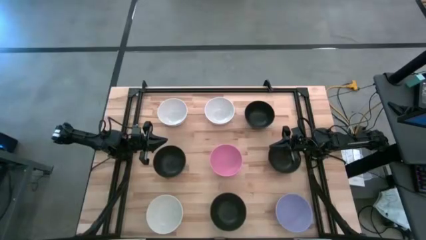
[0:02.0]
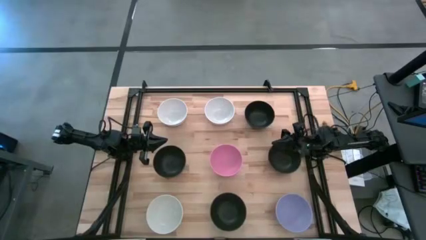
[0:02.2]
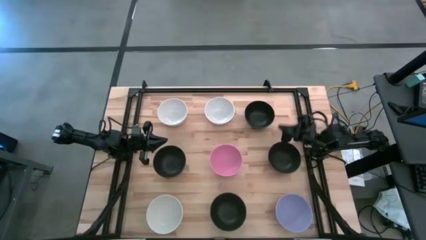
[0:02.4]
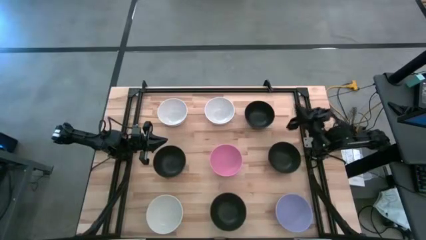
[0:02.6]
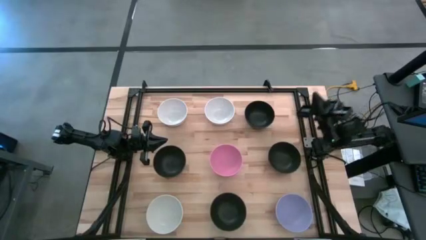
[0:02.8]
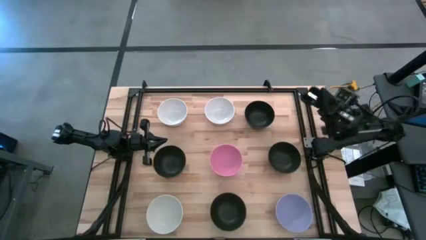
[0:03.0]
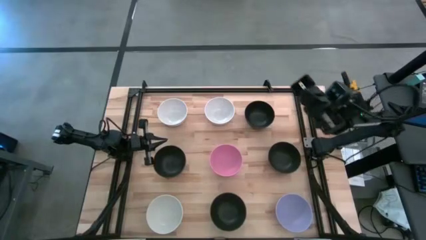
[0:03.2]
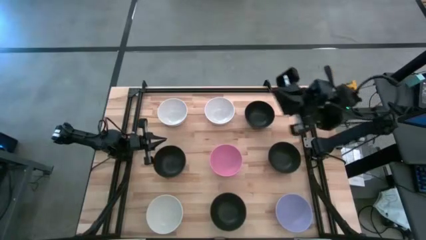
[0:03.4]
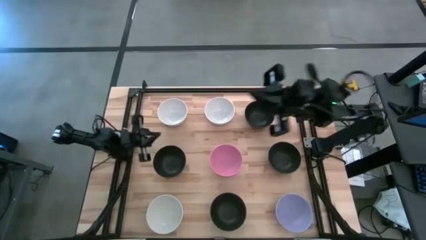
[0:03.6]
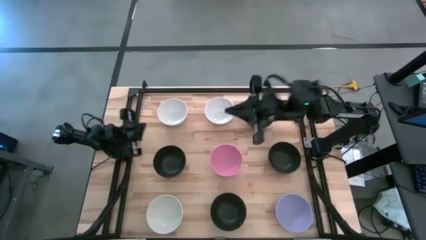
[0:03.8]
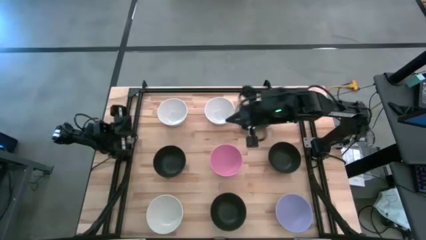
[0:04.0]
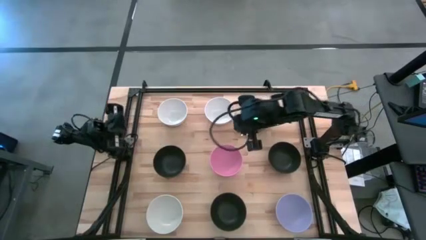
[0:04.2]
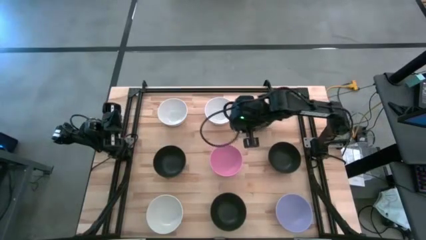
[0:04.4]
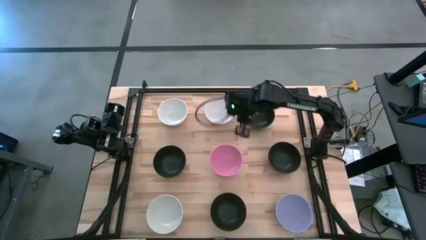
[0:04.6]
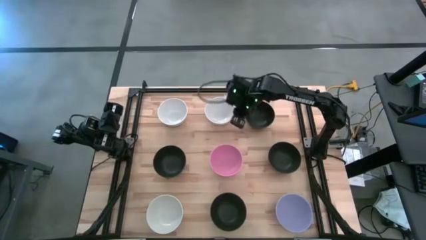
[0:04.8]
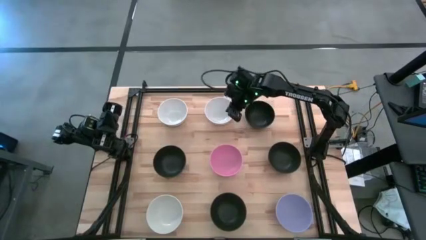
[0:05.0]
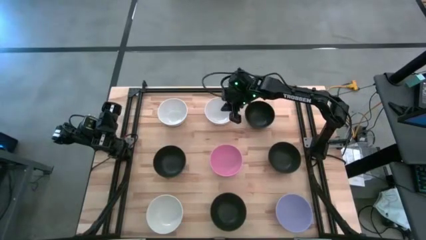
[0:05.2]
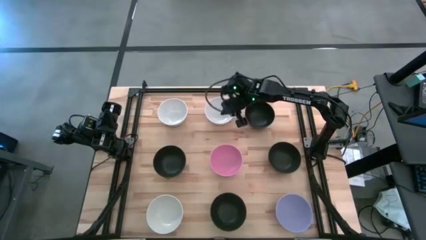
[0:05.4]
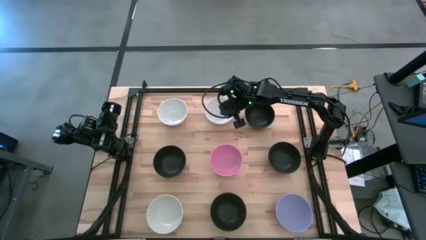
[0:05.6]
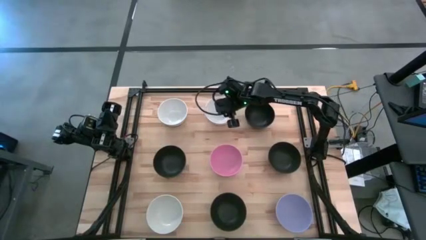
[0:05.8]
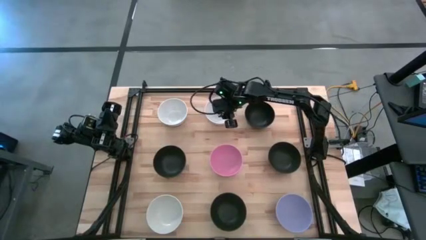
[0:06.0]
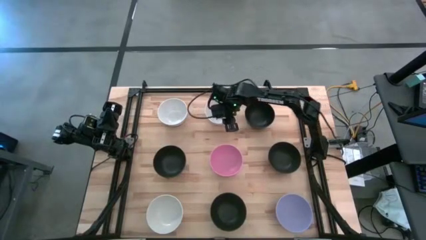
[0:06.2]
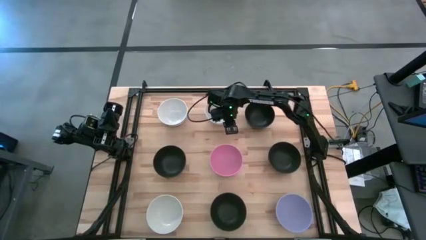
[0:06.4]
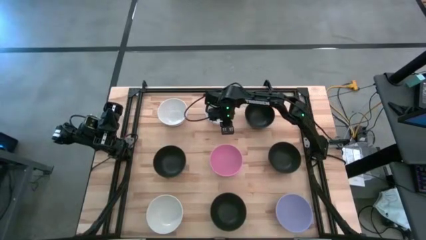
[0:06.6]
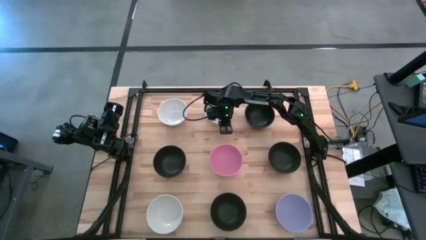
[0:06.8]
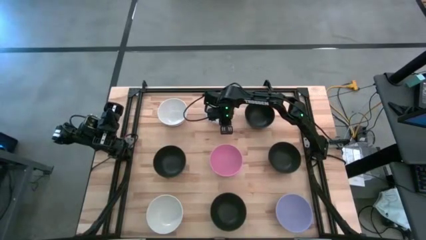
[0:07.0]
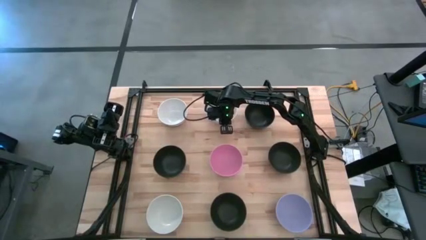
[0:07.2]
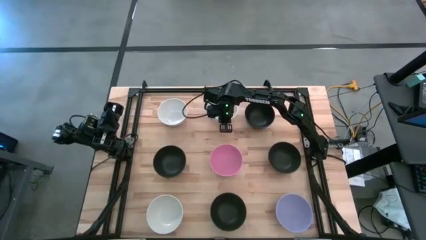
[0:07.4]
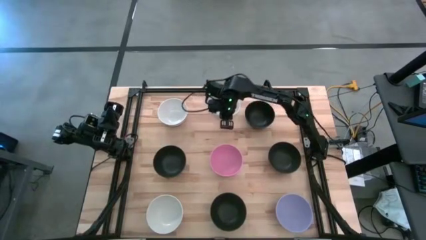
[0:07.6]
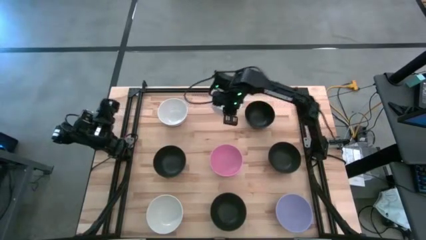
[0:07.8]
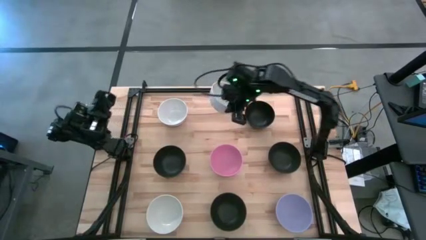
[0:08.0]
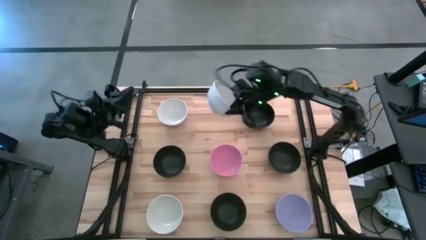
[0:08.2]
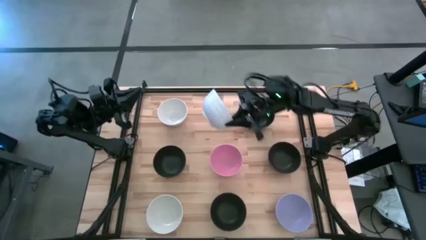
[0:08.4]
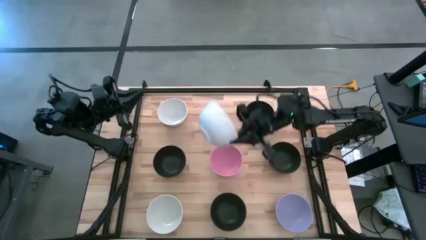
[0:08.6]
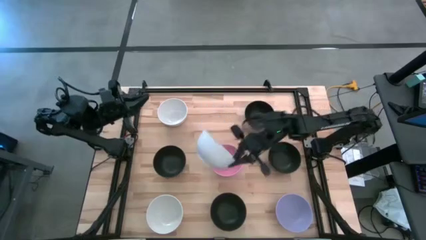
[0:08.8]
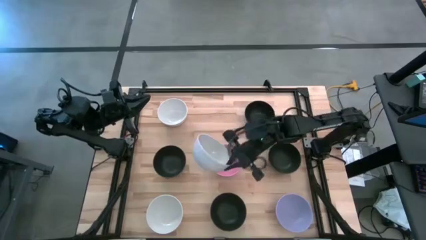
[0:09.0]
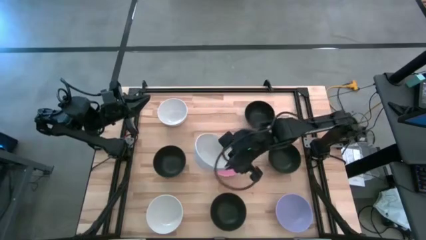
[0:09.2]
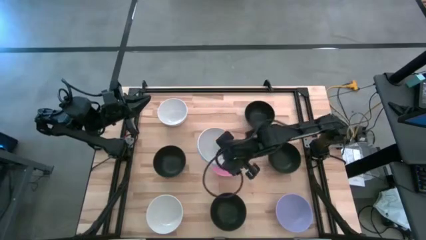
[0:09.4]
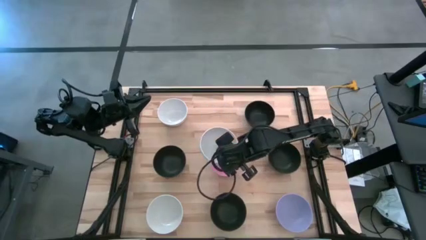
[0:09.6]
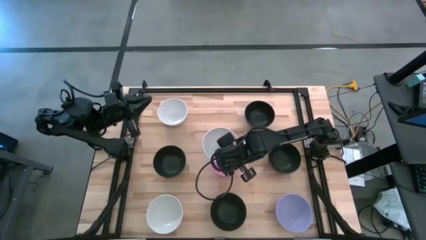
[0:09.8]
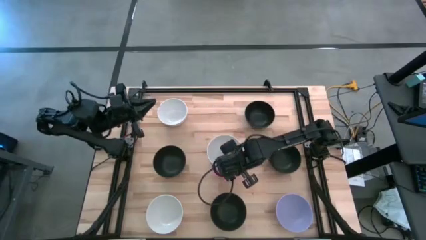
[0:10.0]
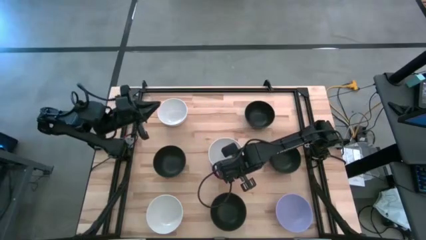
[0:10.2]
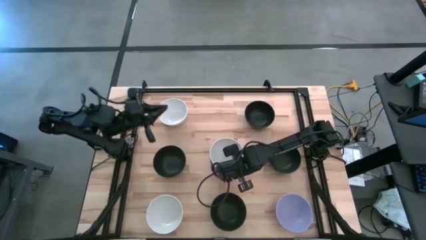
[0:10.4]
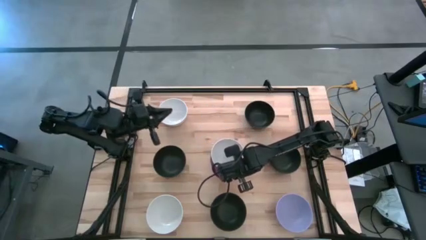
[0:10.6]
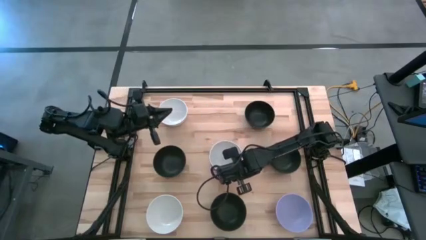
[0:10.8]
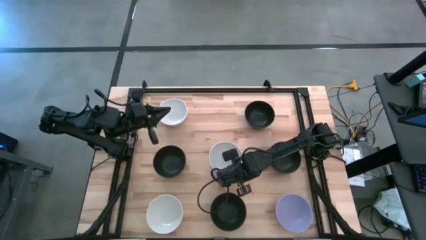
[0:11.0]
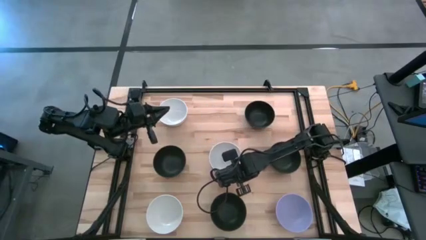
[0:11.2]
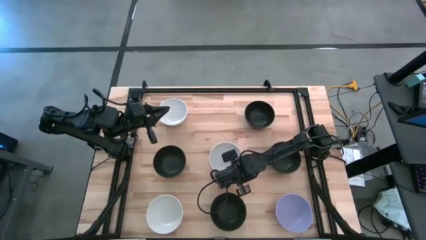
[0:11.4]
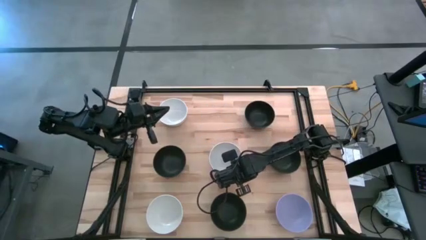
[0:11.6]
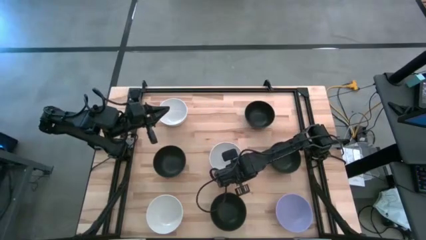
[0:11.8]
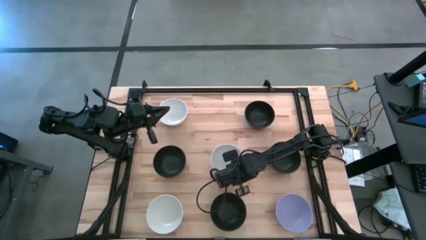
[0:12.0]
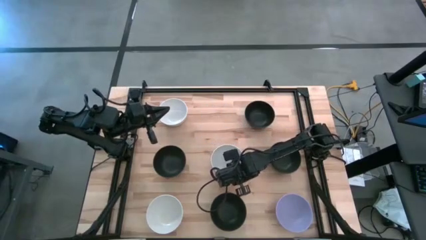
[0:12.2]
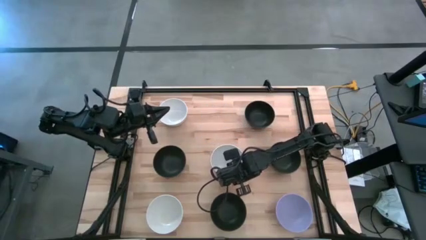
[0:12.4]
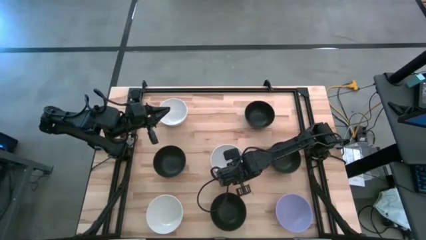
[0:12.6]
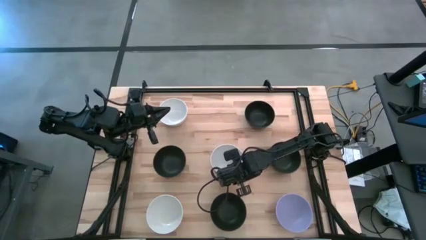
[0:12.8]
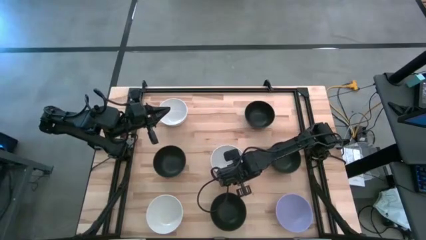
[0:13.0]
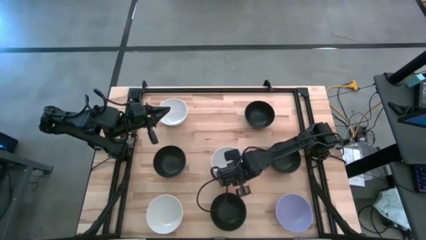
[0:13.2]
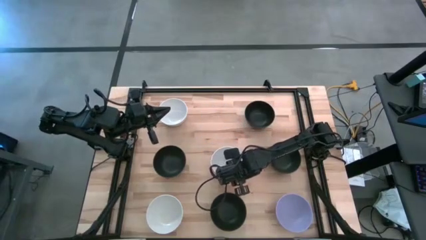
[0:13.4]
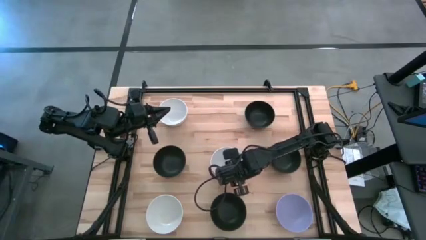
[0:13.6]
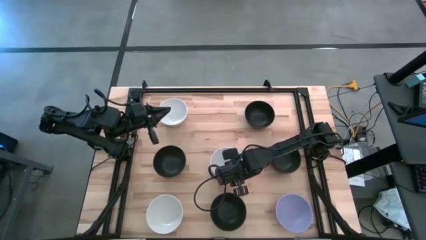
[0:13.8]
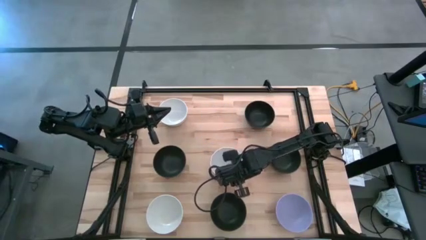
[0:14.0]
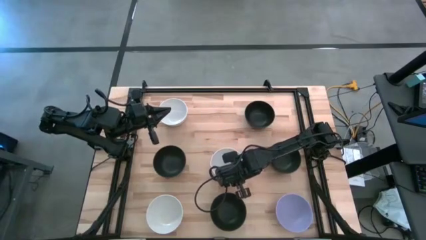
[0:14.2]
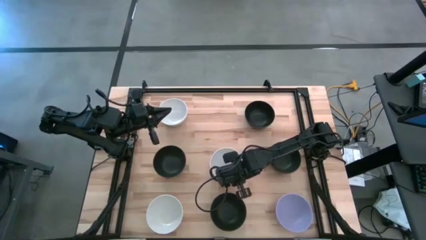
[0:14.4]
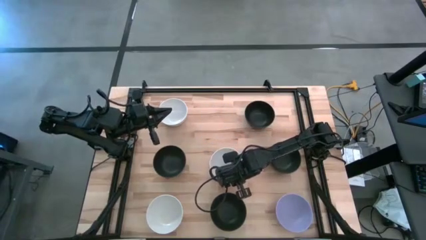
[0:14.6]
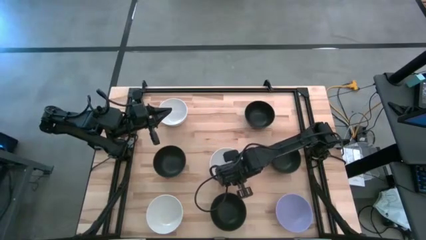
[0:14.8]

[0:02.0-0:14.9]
Task: Nest bowls inside each other
Stack the top right white bowl on top of the pink bowl
